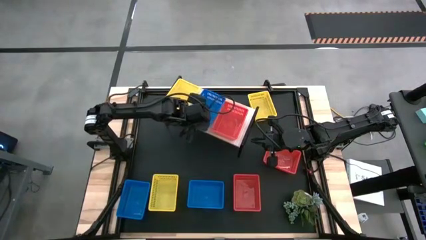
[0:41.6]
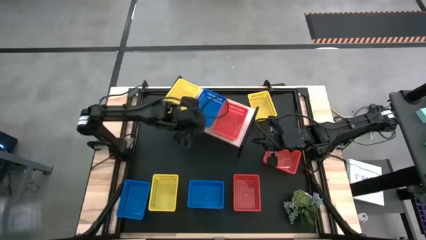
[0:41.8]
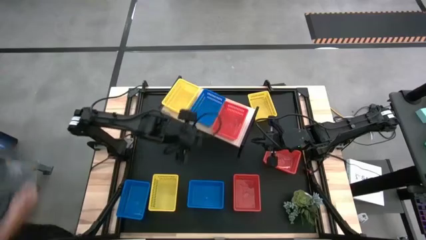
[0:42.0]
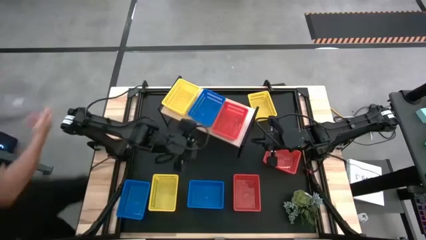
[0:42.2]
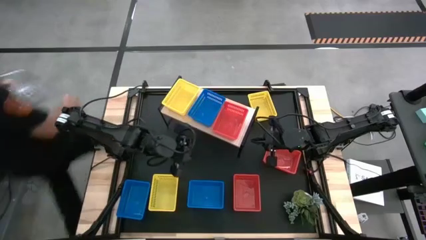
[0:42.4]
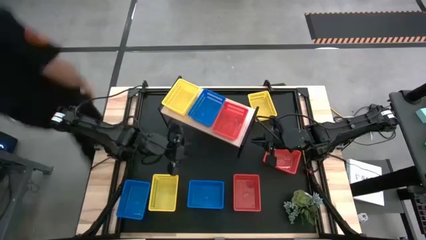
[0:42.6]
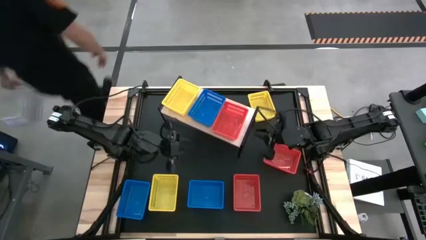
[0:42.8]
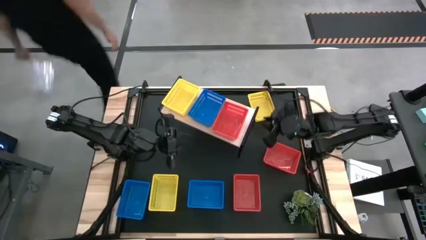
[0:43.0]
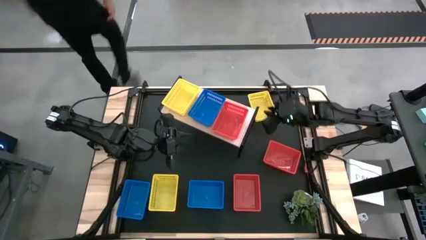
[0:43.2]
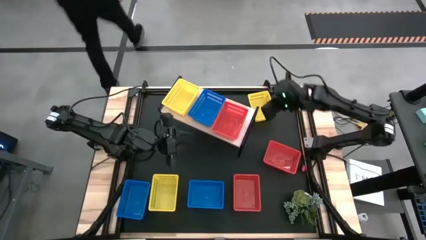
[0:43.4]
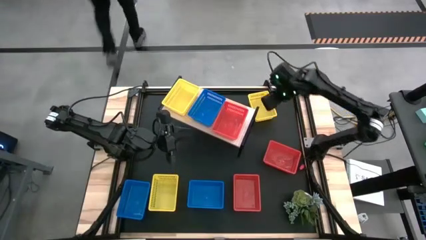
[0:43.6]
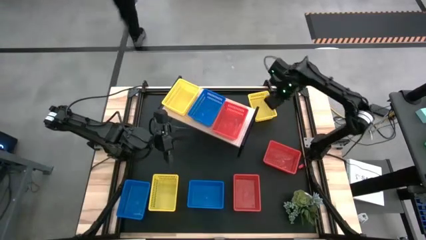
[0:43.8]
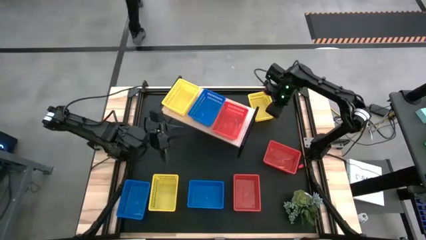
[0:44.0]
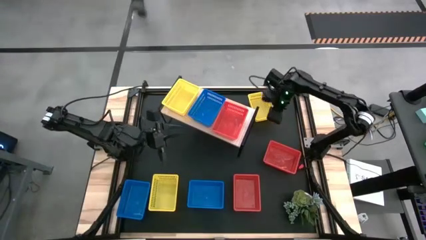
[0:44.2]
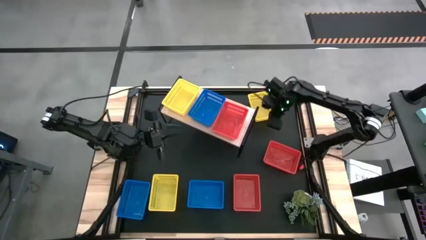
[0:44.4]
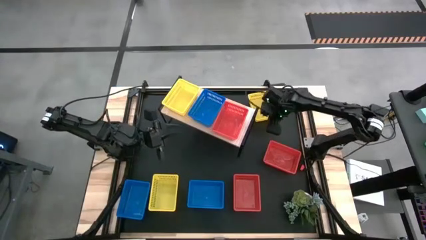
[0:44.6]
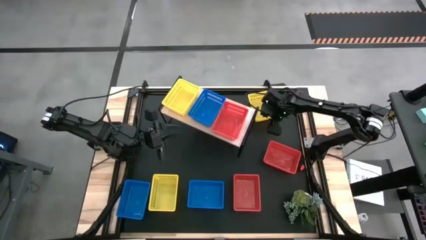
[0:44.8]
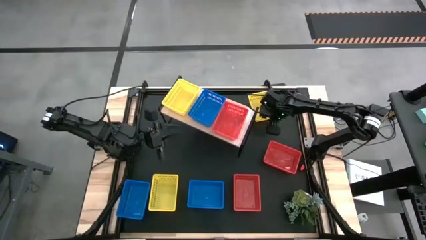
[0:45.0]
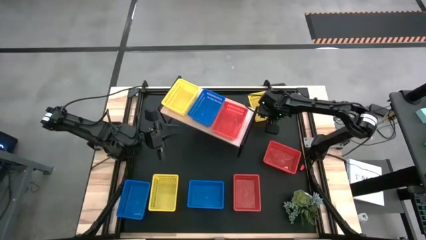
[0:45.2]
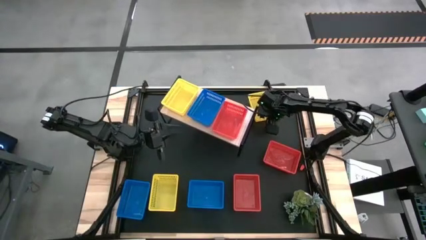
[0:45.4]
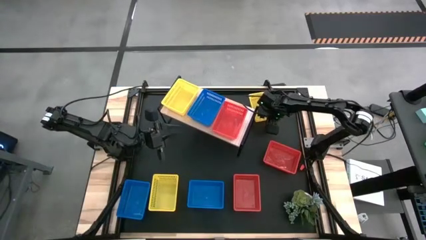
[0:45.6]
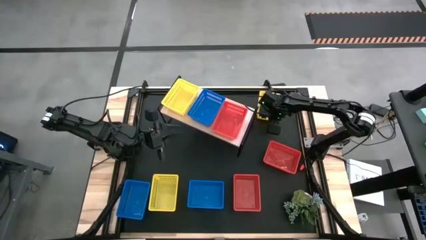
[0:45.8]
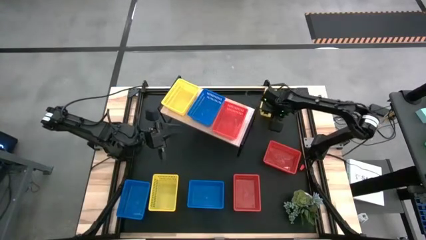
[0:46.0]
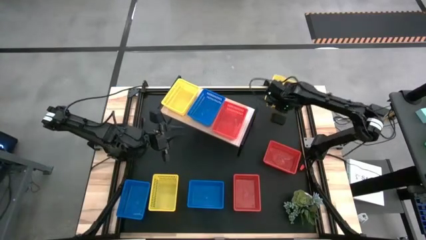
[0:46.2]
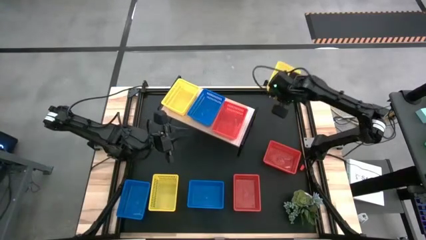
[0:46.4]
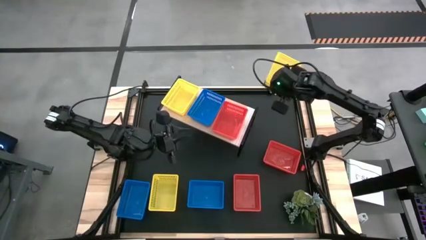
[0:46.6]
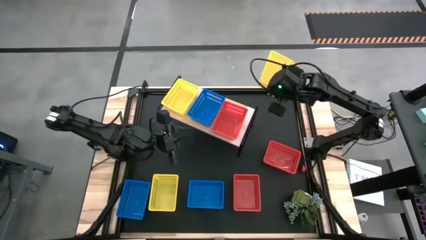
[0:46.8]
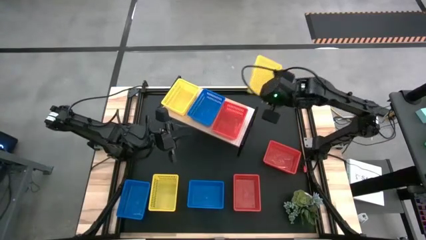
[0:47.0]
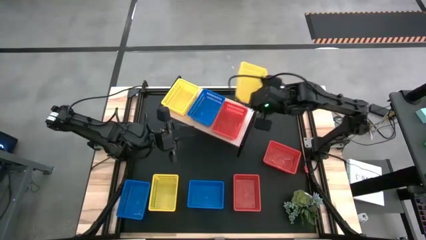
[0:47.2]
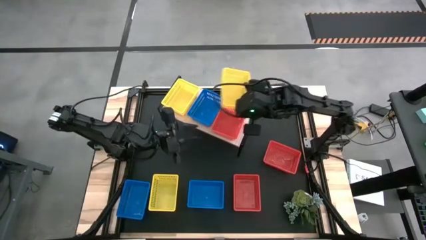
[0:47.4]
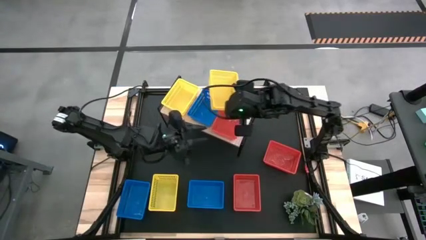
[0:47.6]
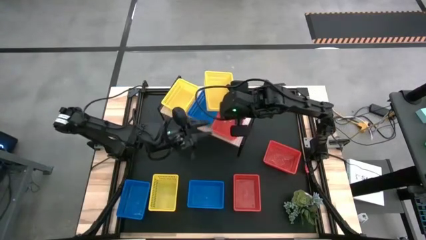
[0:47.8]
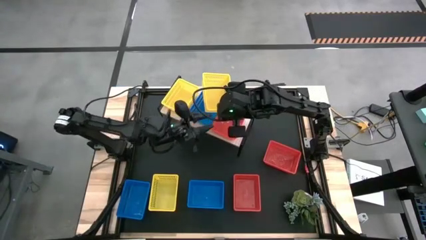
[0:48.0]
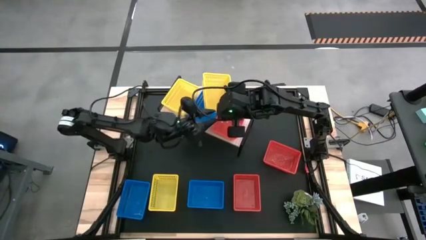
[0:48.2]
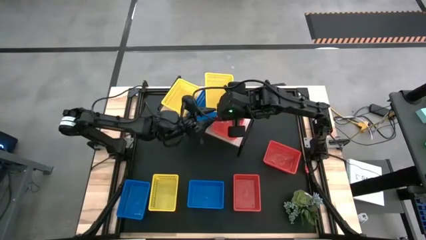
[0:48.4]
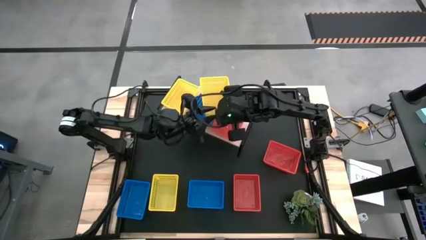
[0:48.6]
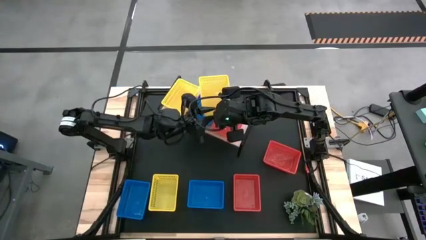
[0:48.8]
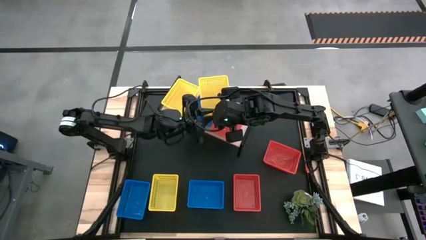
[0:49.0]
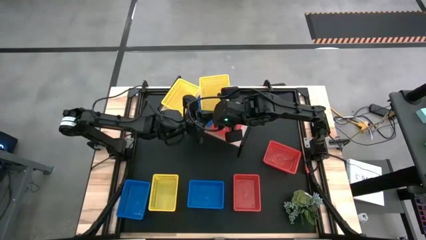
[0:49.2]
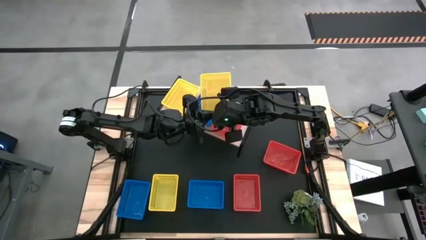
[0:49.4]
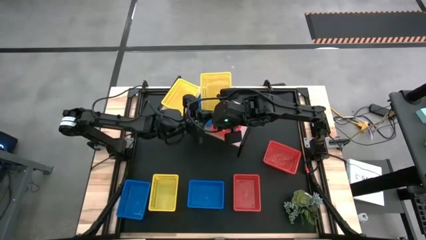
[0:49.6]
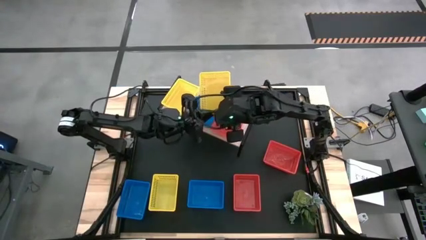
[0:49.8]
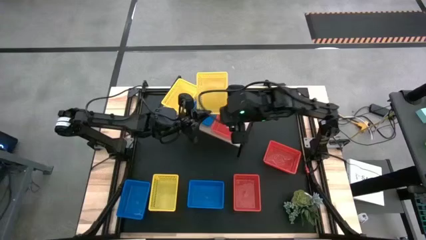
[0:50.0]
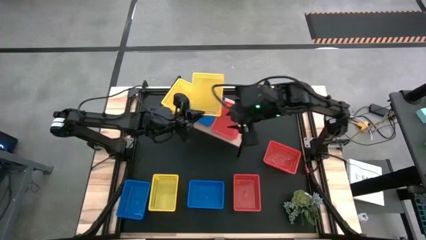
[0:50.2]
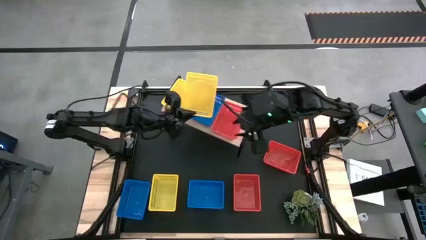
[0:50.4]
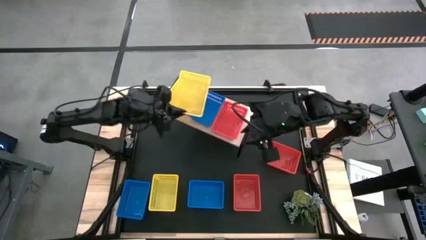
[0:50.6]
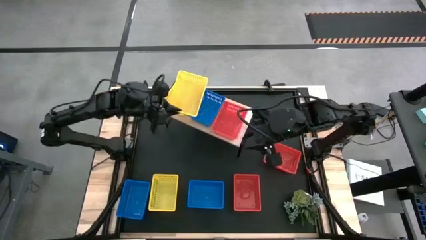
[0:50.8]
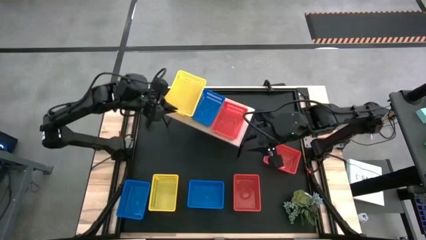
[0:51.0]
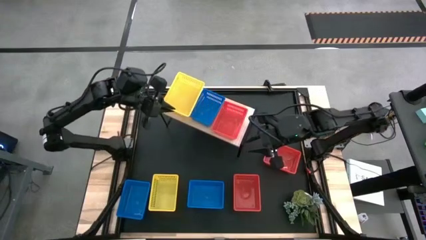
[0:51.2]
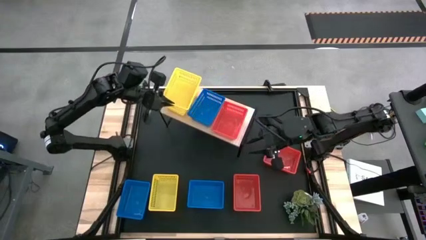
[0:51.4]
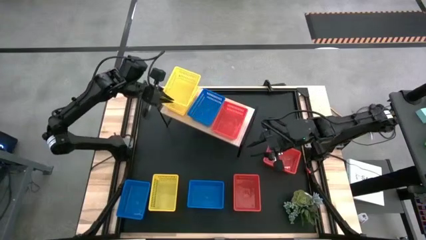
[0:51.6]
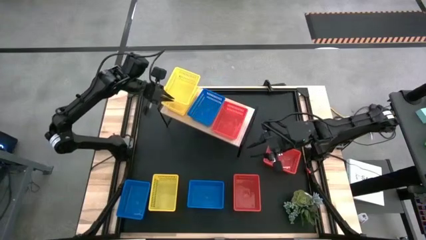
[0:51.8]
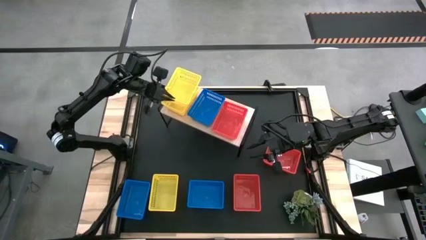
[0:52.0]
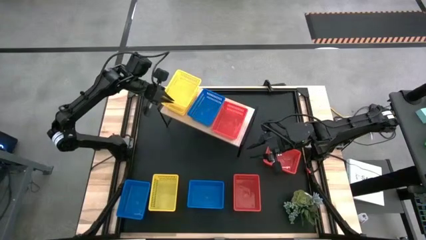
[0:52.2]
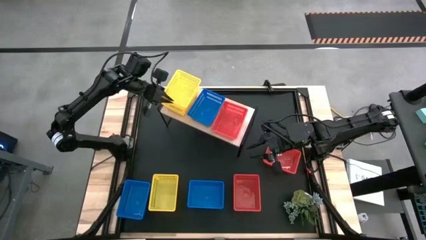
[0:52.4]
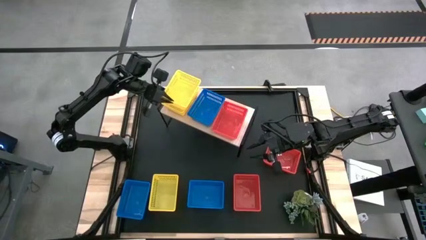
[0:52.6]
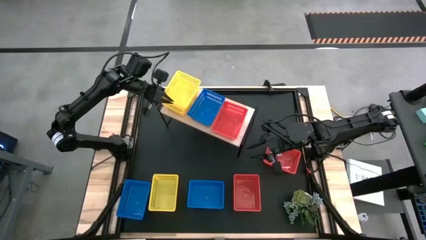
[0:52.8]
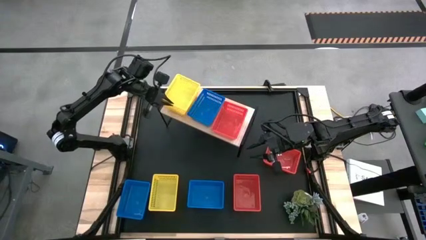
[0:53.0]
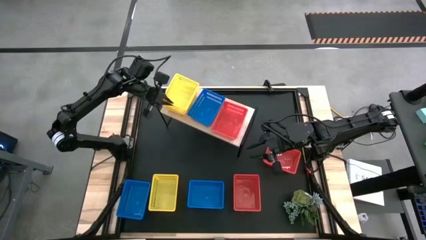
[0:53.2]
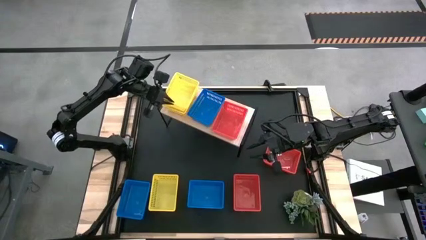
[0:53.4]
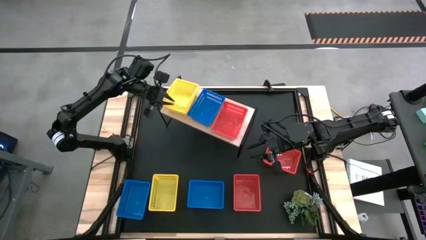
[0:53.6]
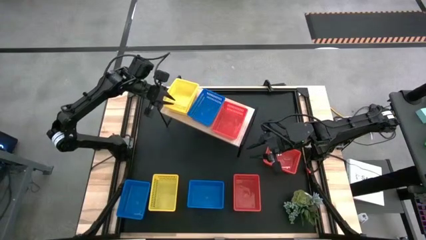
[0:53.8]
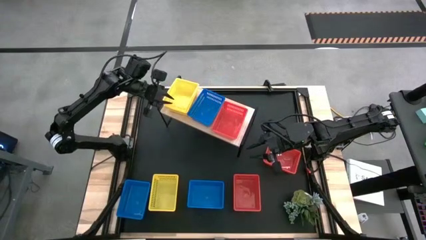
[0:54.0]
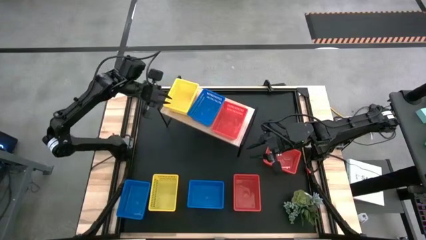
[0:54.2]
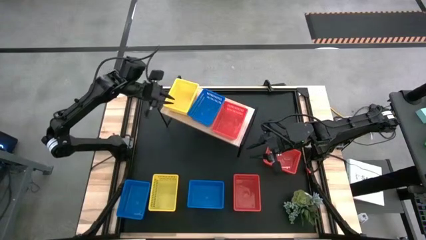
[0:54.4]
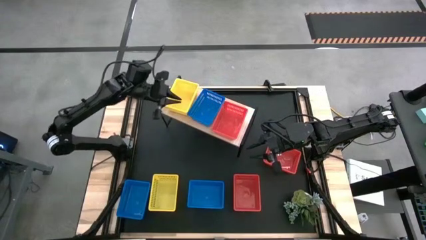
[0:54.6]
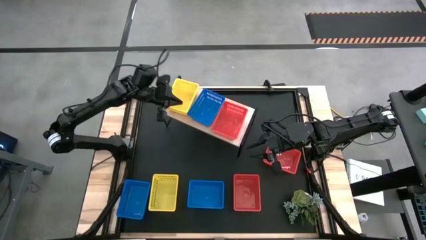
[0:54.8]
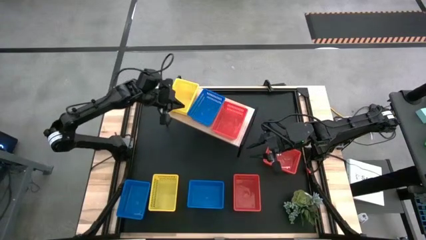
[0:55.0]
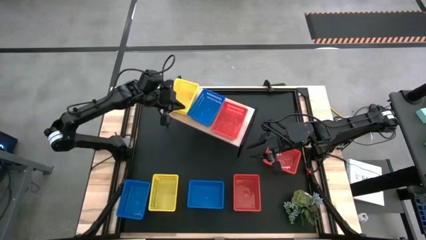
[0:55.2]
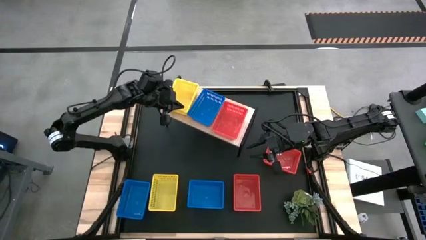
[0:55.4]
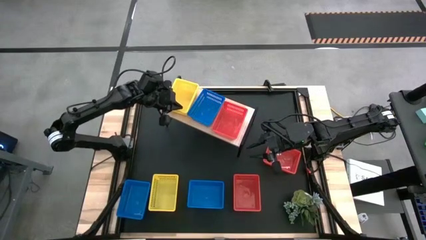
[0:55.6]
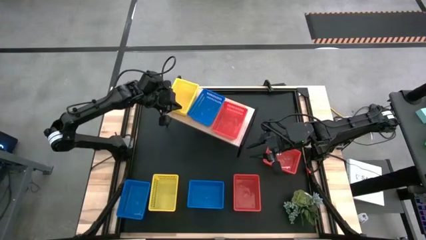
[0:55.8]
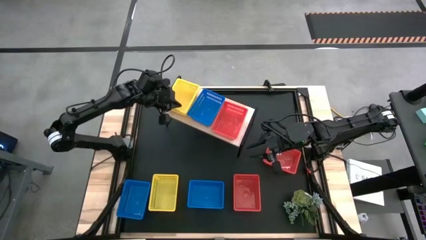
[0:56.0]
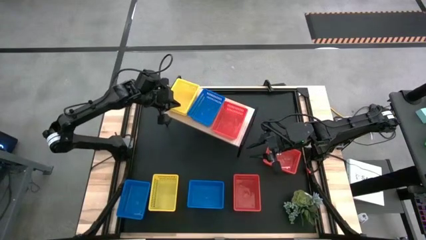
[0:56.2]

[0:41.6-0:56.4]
Task: Stack baskets on shelf by color
Stack the top right yellow bin on top of the yellow bin on the shelf
